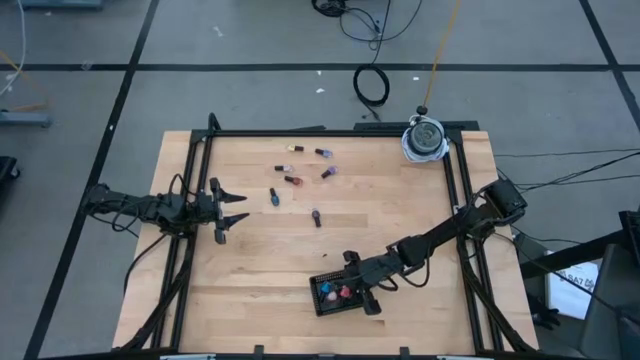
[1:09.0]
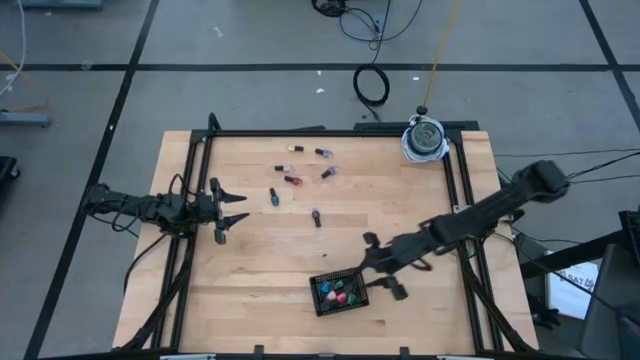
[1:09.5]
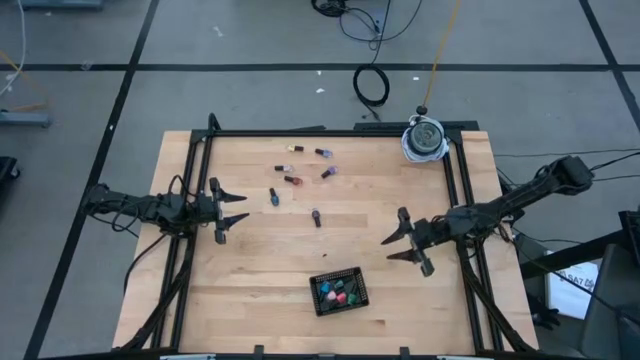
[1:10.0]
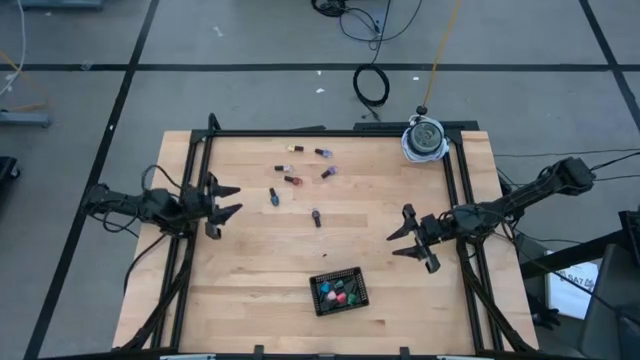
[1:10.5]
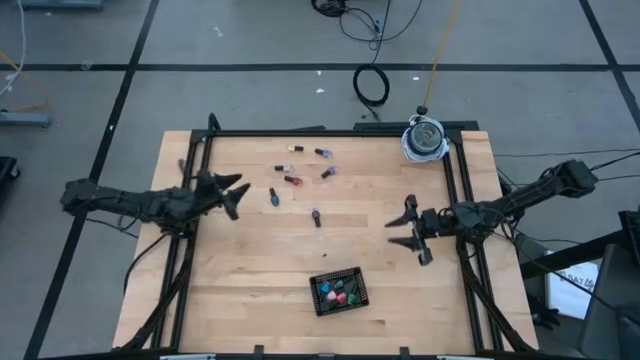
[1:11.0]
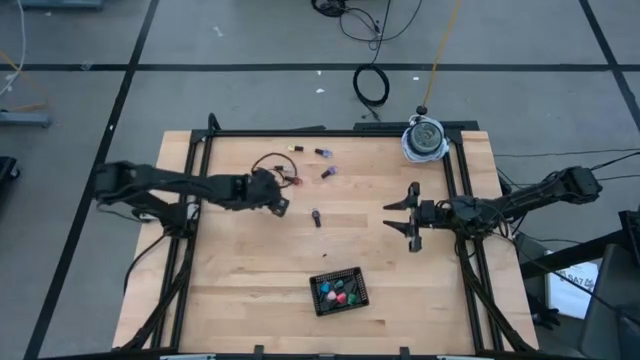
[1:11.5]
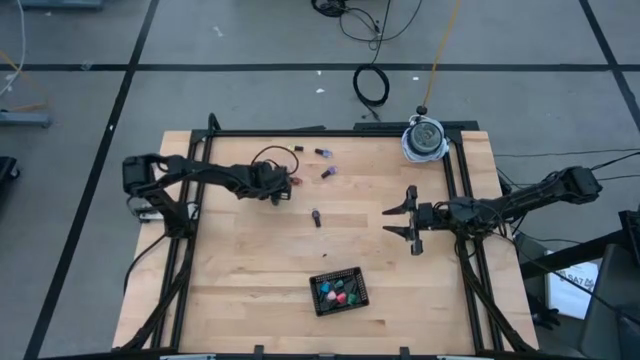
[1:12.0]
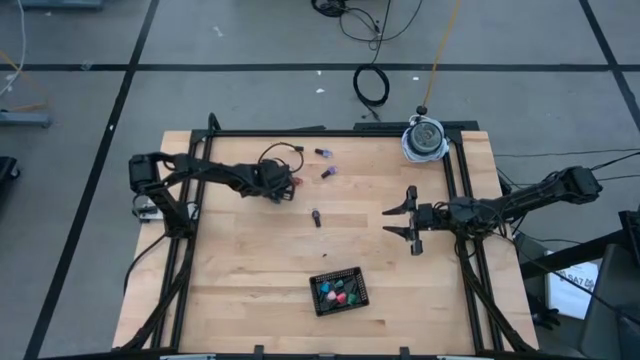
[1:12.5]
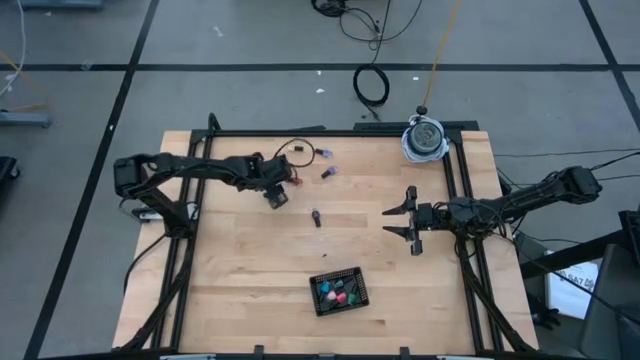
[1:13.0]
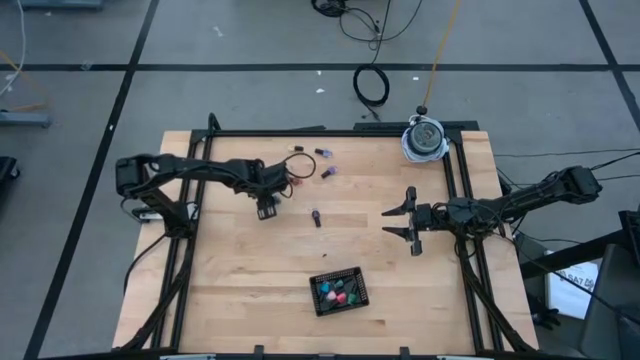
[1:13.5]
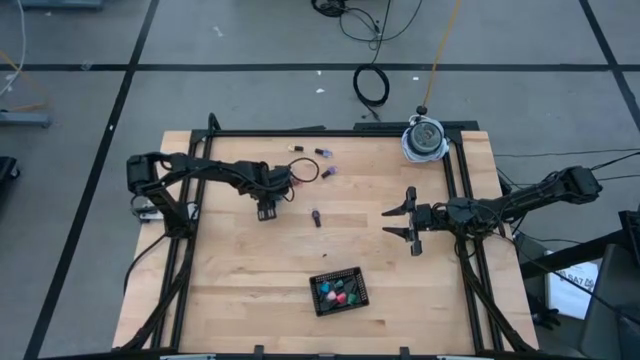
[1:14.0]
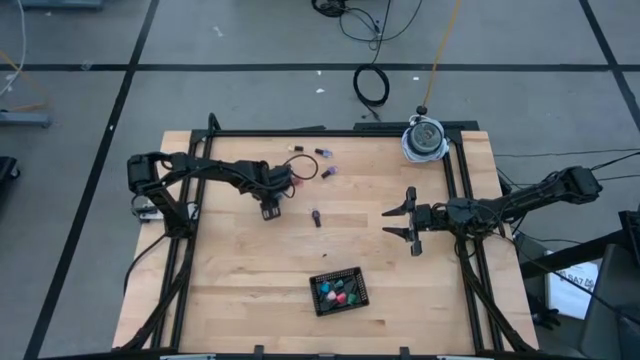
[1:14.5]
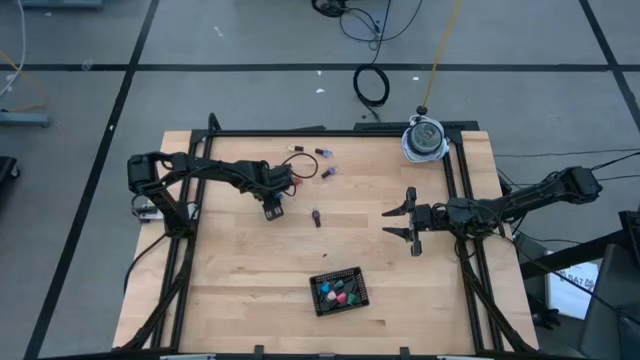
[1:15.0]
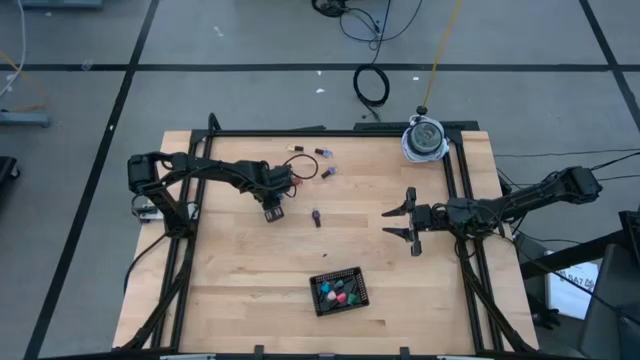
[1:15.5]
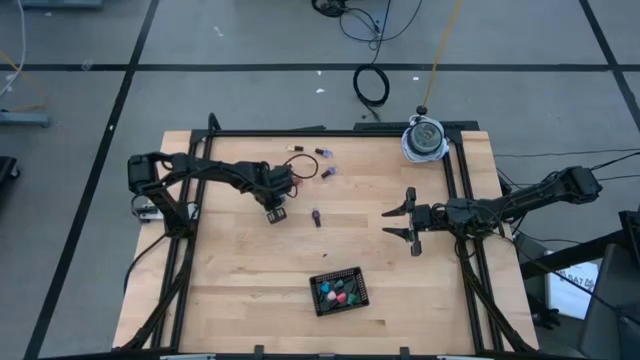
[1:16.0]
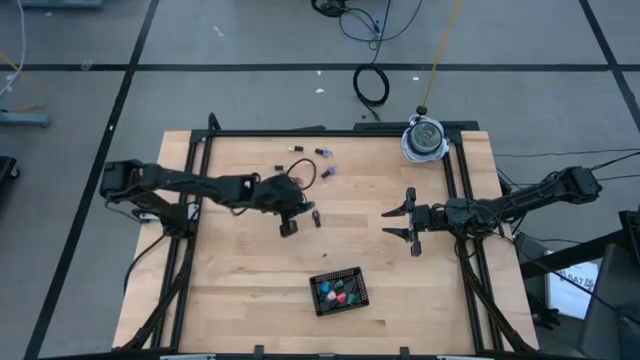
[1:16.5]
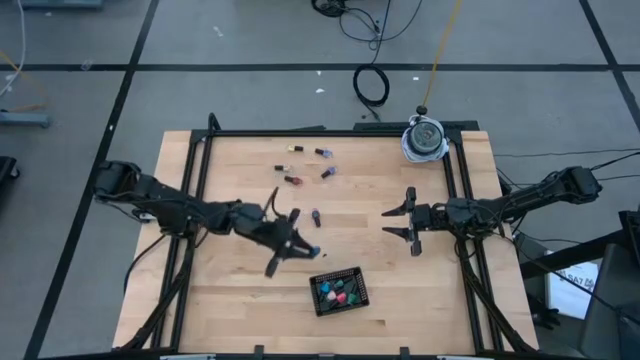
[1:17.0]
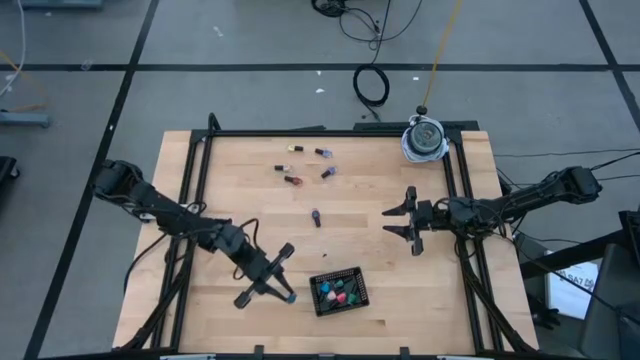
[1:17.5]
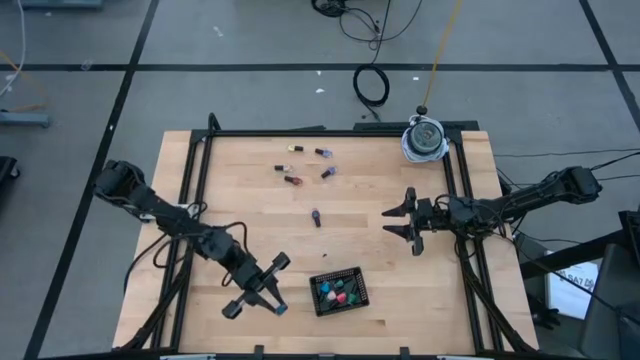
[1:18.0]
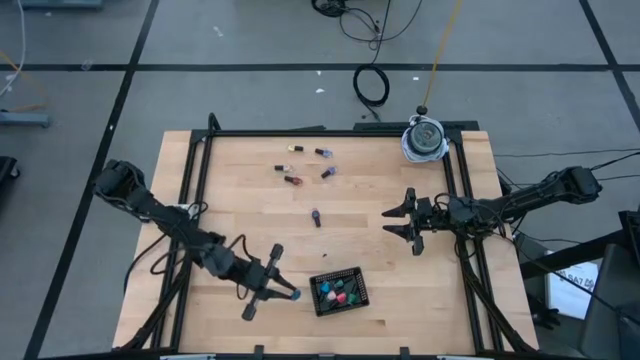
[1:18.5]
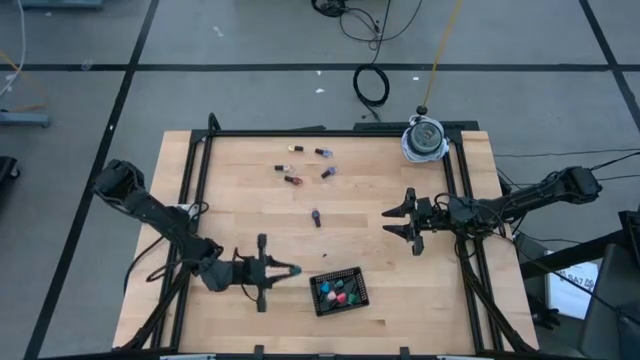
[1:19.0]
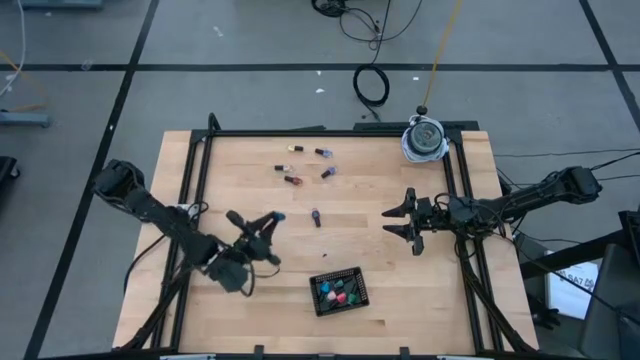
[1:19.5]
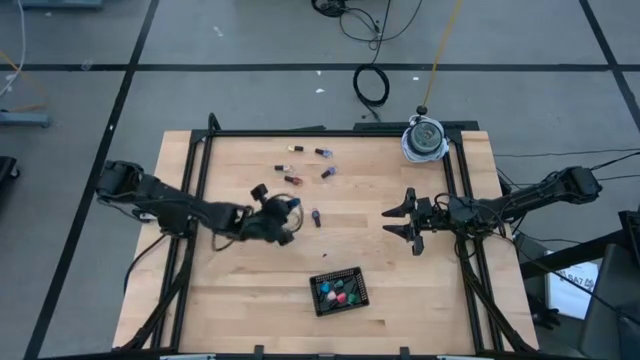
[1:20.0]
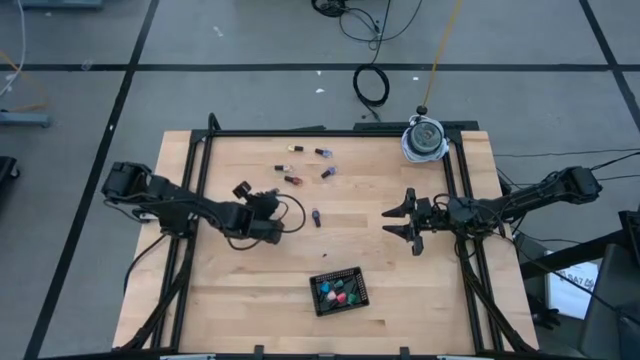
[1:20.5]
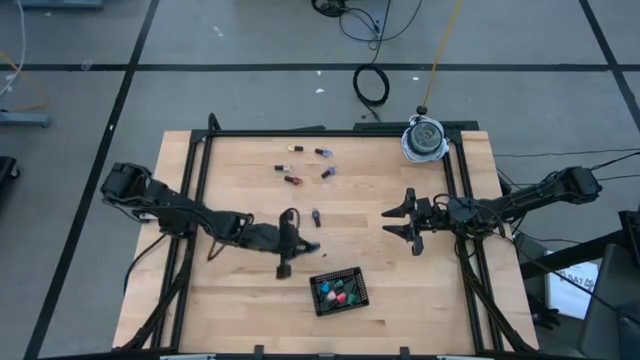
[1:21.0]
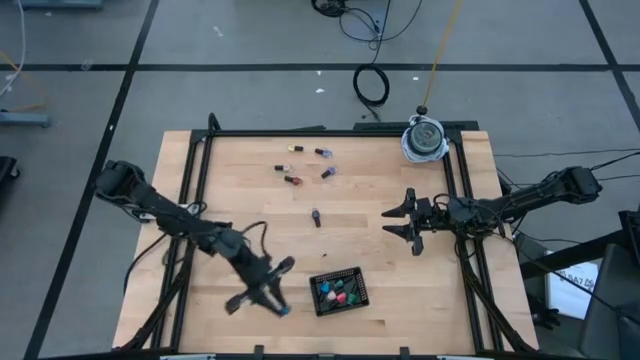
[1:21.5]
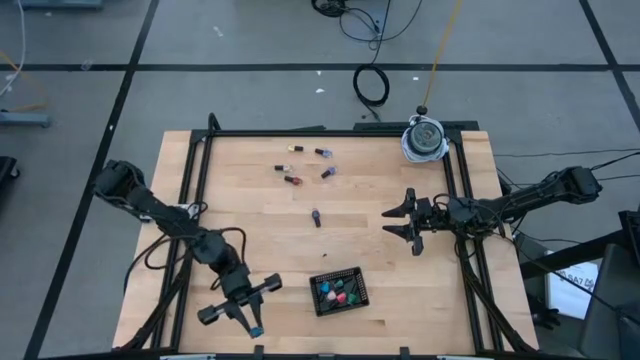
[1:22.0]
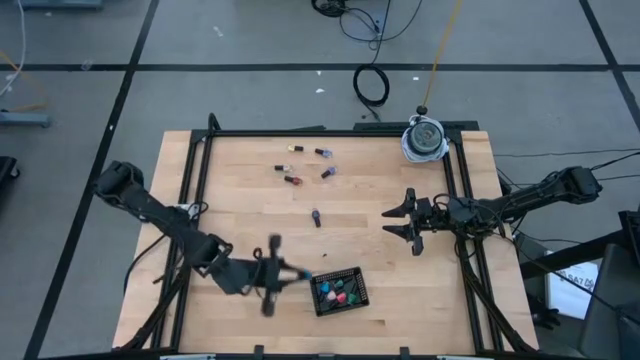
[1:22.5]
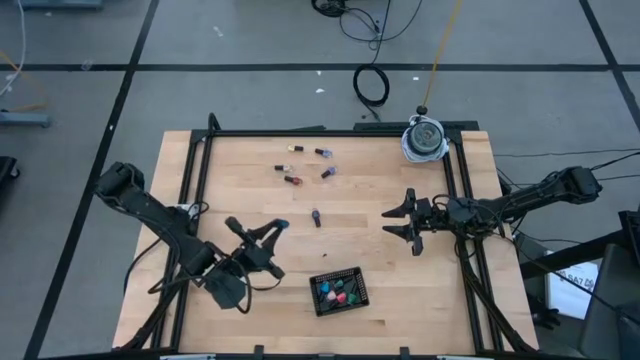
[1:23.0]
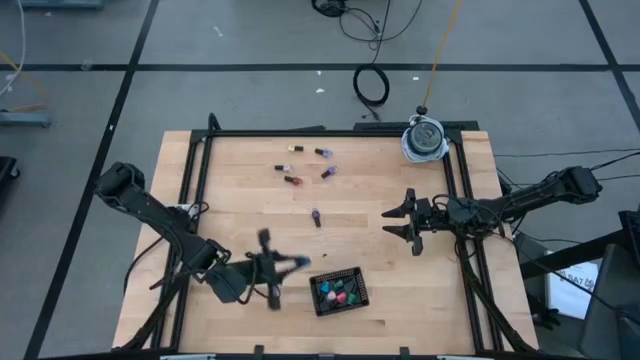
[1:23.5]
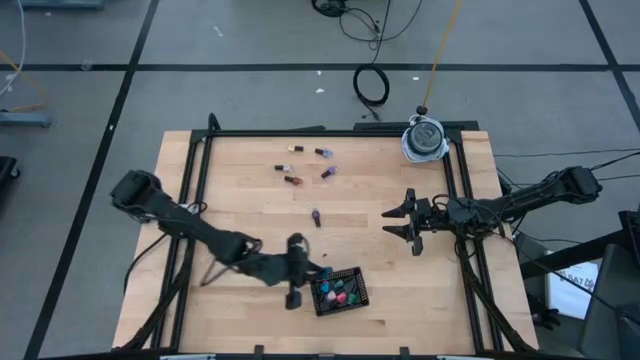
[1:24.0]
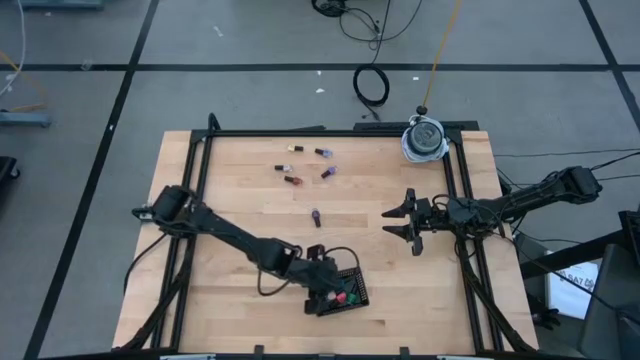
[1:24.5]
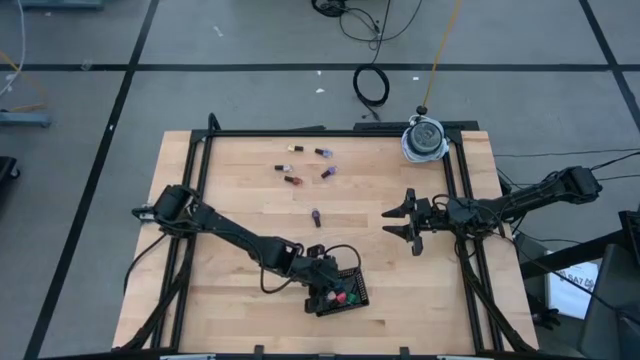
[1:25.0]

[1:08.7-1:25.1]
Task: Pick & Place Nail Polish
Put the dark blue nail polish bottle into the black bin

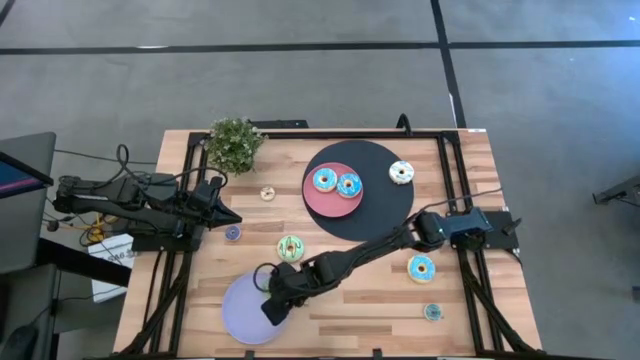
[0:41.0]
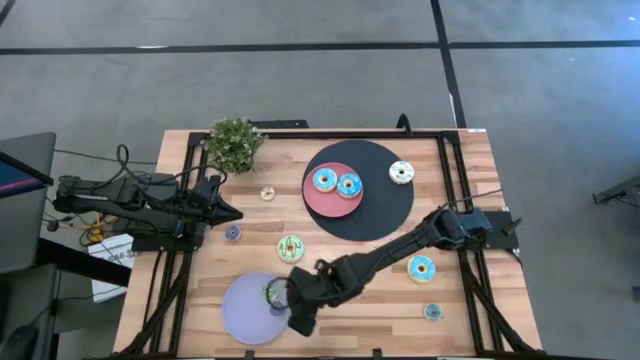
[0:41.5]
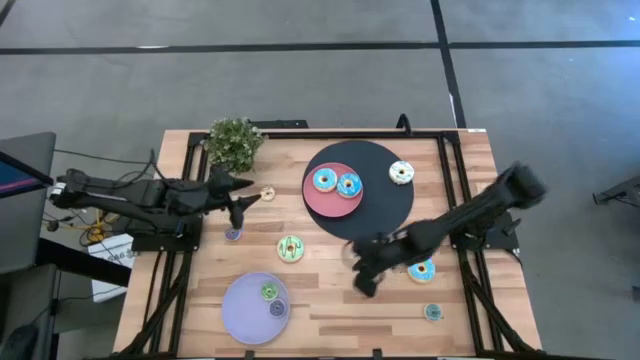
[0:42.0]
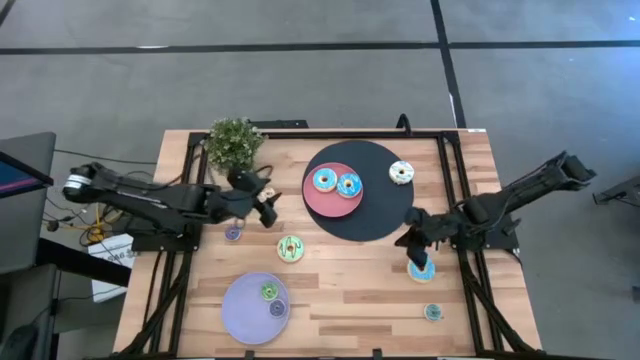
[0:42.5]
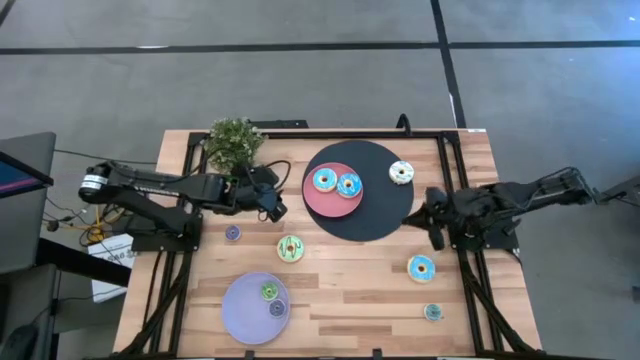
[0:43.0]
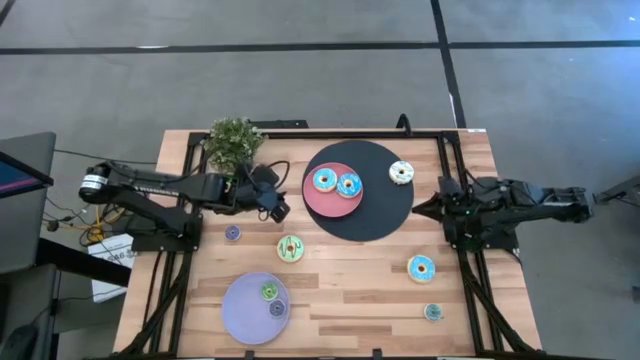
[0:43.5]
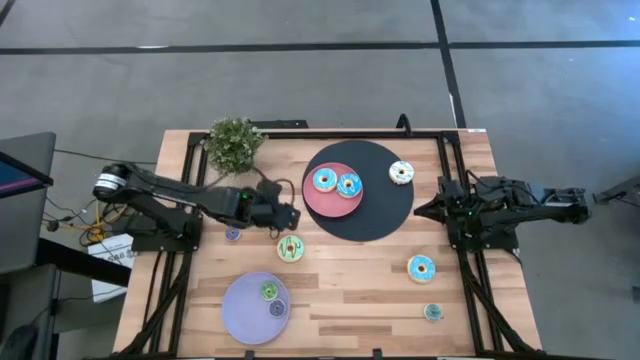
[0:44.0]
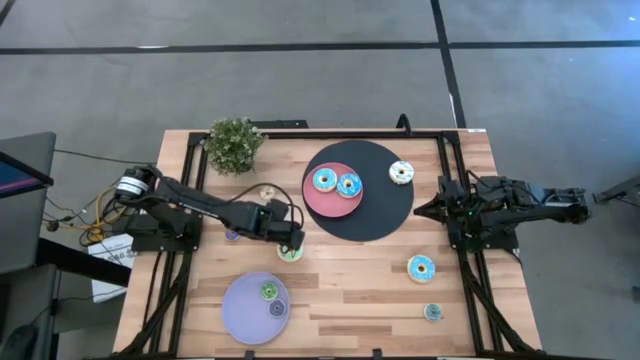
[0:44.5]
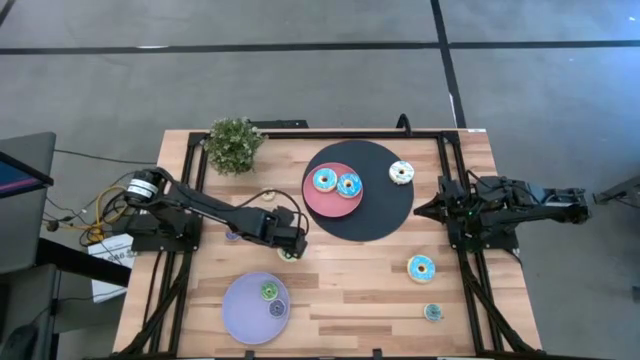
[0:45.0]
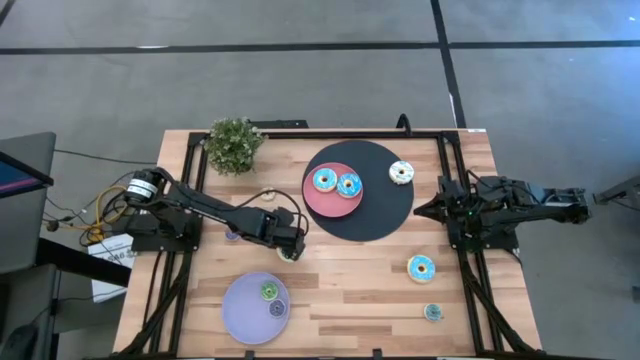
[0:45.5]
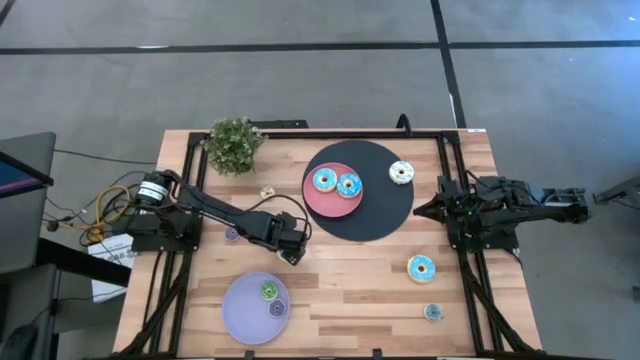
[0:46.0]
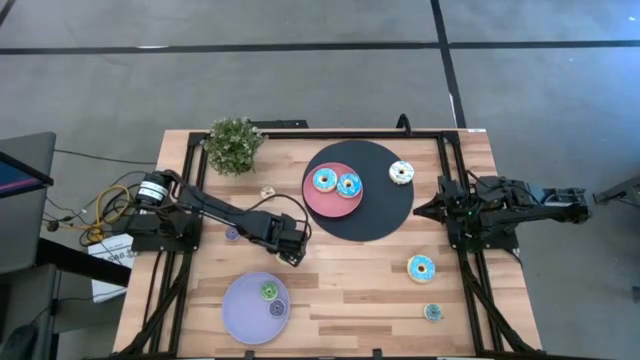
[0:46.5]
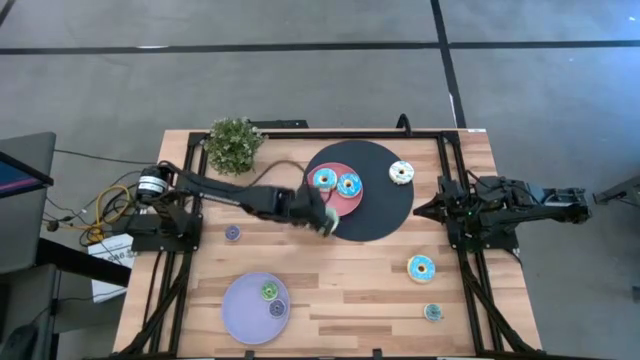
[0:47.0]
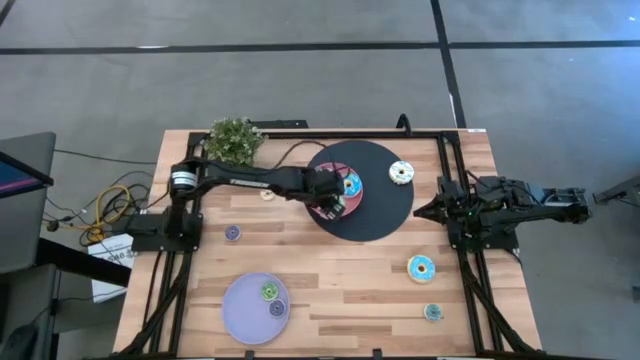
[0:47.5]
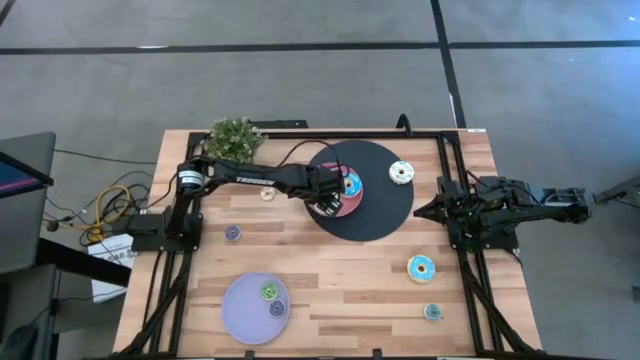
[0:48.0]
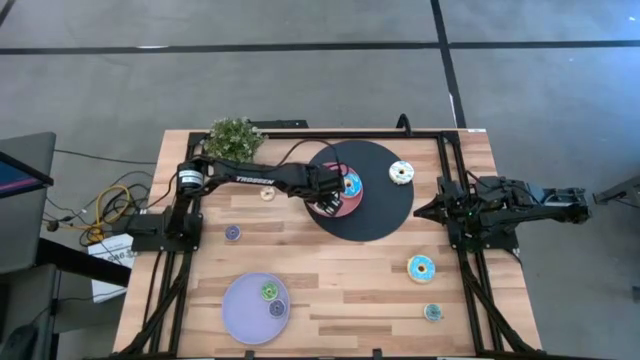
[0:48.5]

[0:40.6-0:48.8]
Task: Pick & Place donuts
Put the big light blue donut on the pink plate
